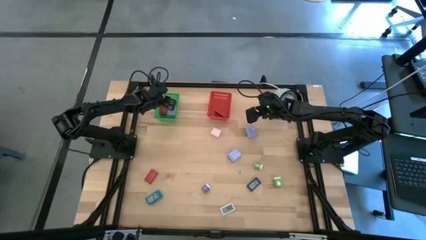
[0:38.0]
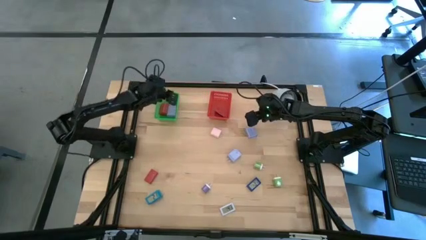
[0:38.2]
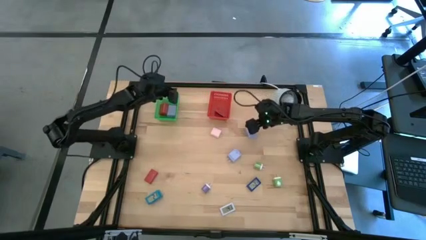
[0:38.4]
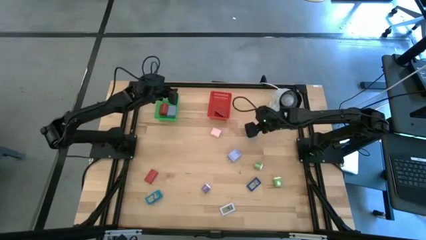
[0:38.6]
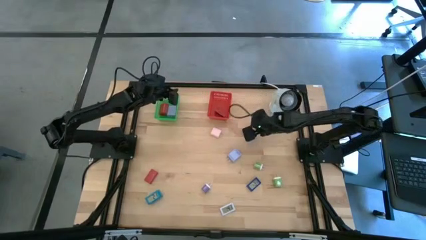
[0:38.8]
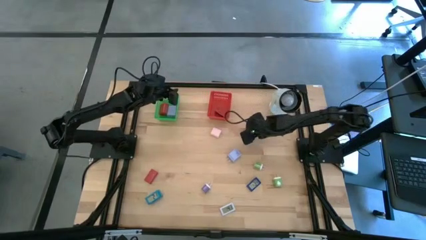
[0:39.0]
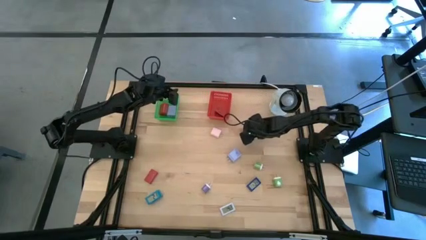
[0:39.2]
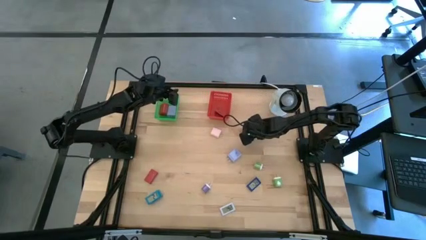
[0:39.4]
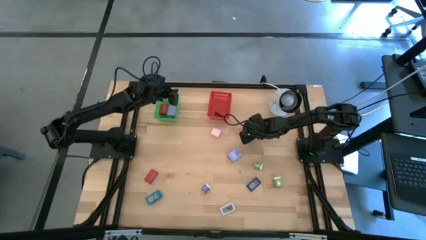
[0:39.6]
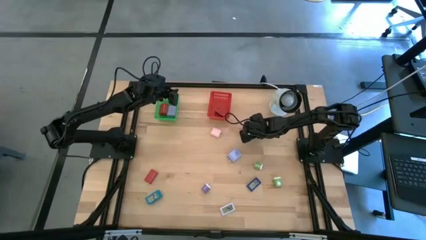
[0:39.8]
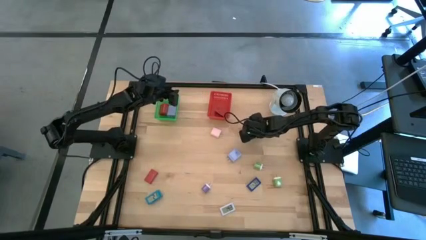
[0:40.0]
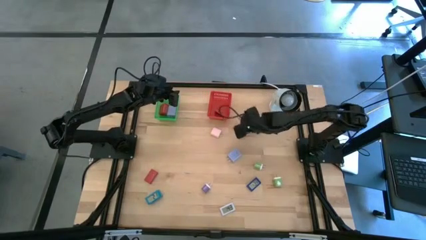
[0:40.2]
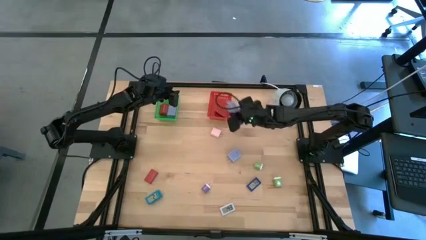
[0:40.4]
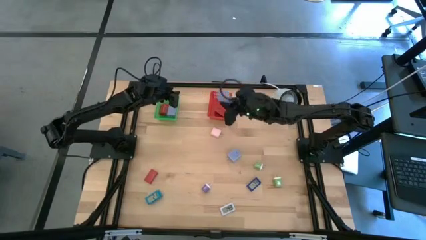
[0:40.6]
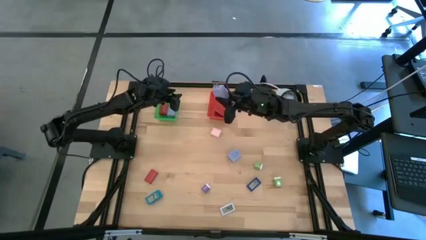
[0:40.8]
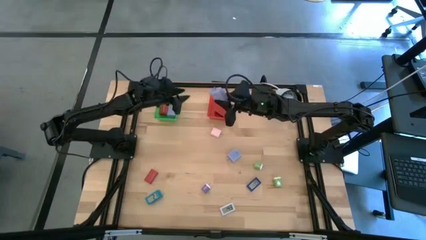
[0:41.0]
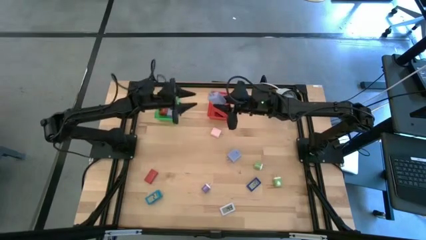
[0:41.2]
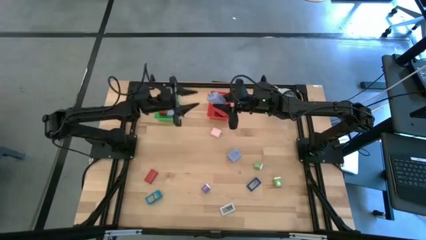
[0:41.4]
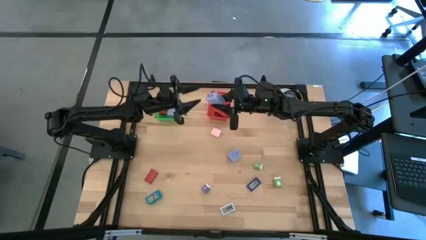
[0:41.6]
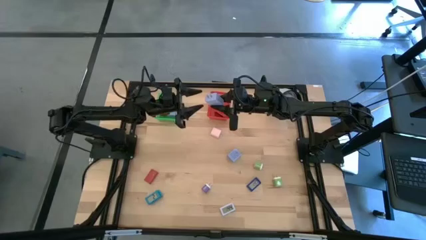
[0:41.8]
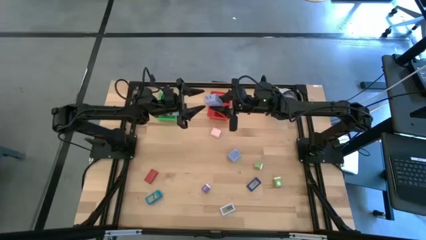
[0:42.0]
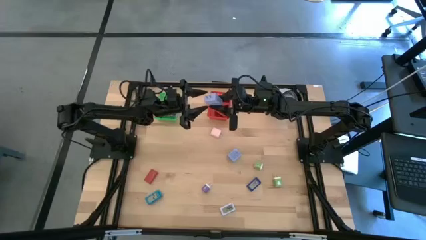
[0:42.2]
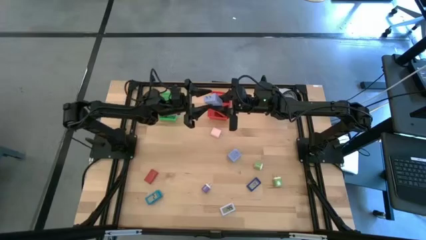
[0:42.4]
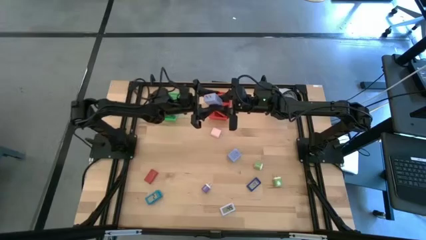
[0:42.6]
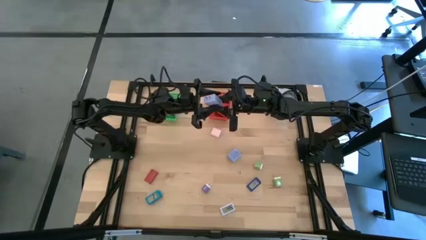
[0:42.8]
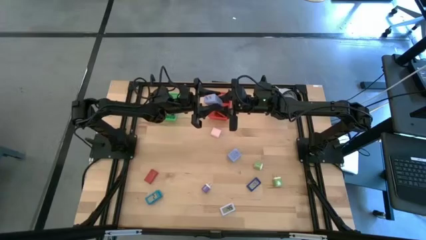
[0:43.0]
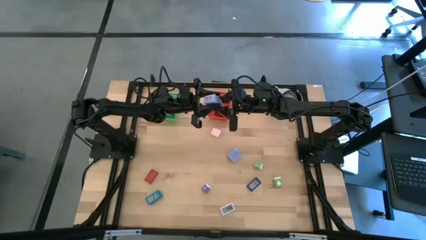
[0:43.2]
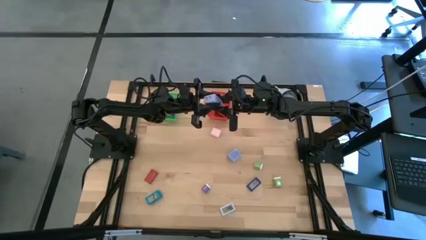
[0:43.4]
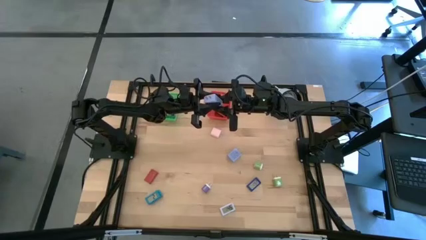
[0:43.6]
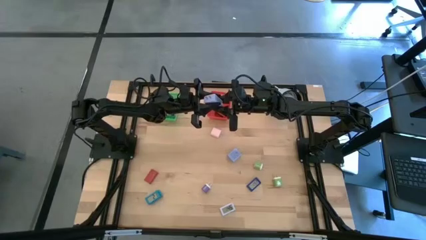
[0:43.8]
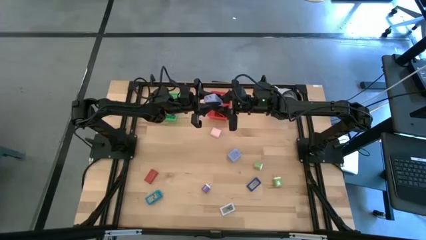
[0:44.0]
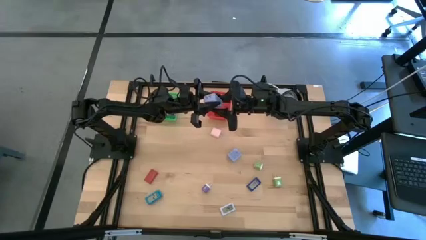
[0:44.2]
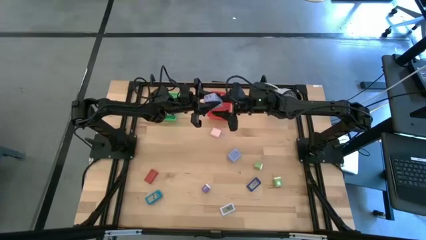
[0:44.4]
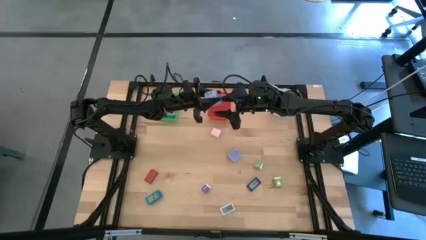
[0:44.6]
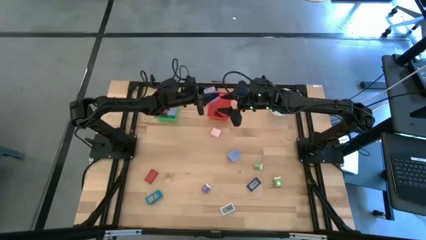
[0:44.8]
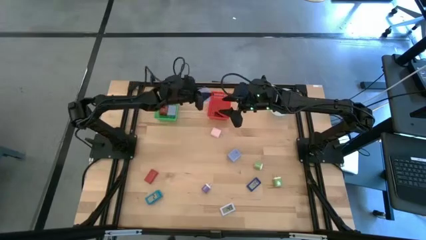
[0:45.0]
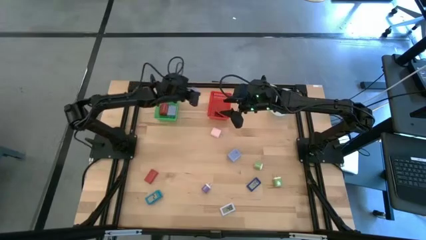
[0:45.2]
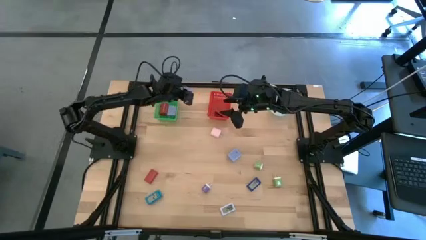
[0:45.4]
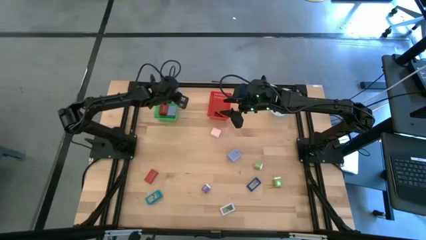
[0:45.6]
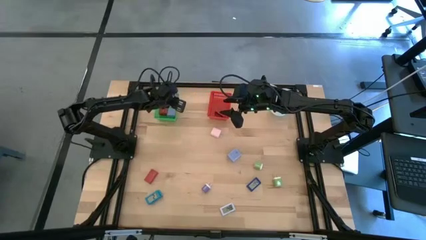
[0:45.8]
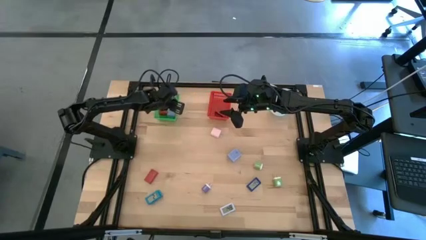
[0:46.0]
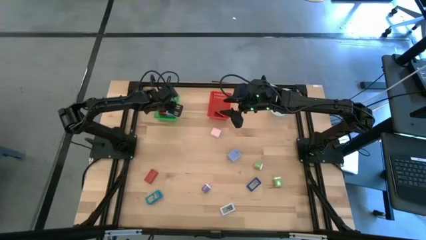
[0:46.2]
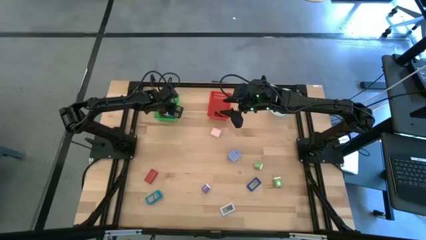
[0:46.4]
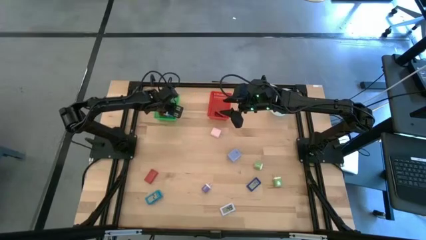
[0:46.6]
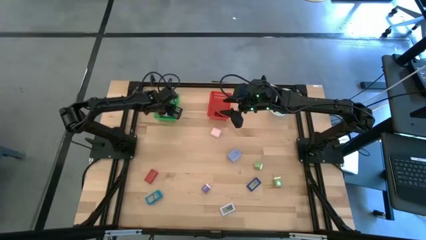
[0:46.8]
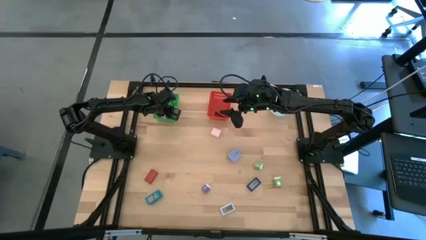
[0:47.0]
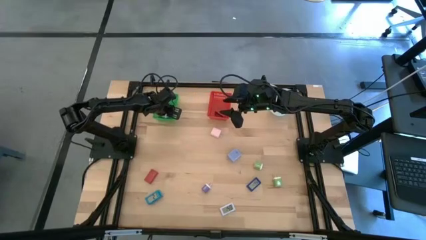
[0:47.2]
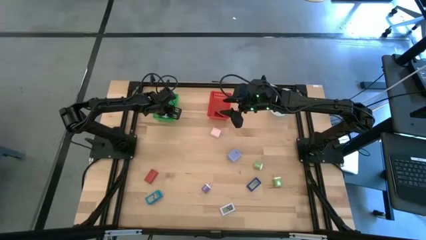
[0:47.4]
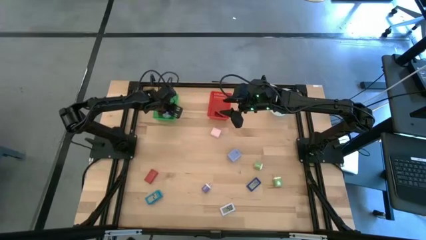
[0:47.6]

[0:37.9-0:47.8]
Task: Pick & Place Office items
Put the top light blue charger adapter into the green bin

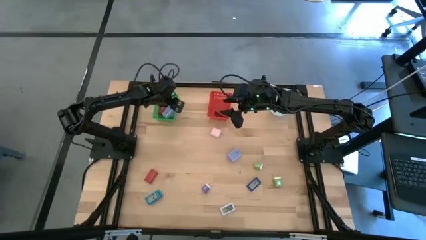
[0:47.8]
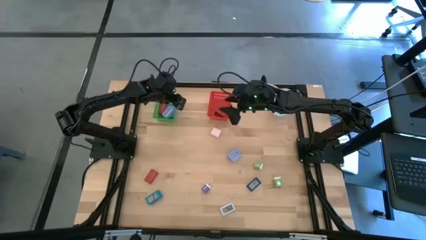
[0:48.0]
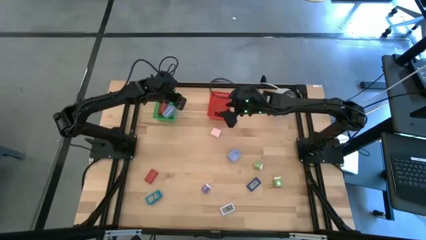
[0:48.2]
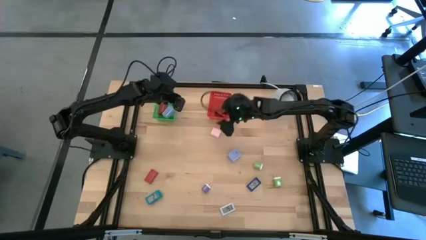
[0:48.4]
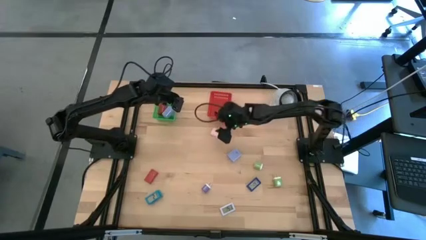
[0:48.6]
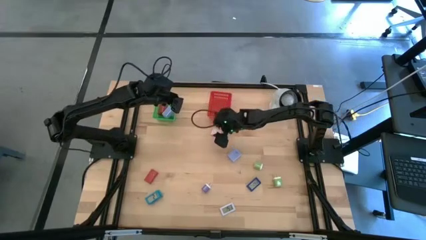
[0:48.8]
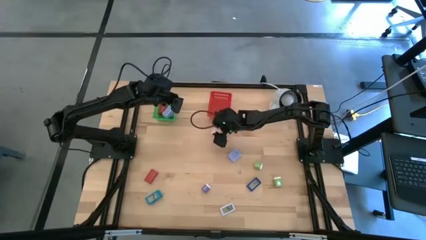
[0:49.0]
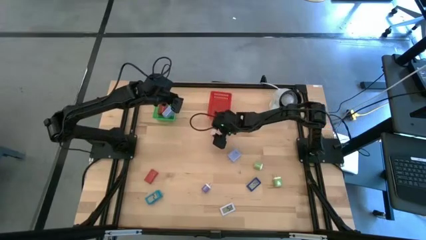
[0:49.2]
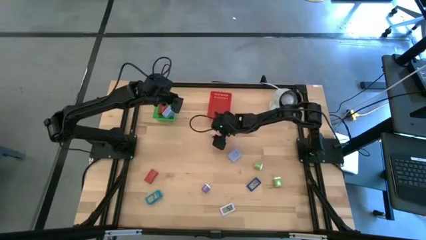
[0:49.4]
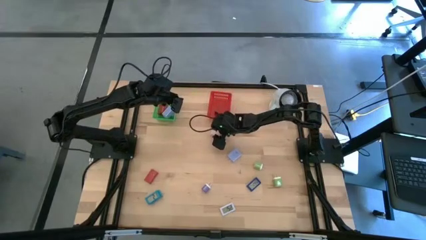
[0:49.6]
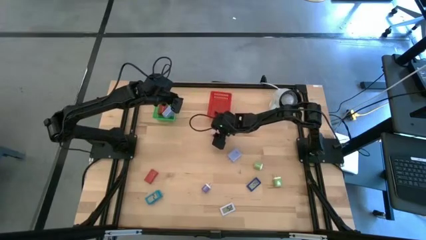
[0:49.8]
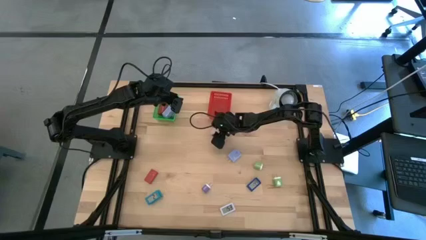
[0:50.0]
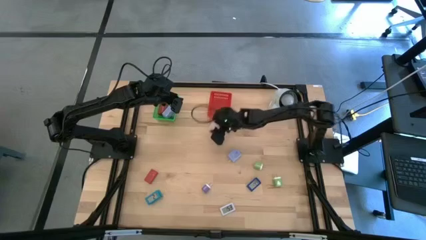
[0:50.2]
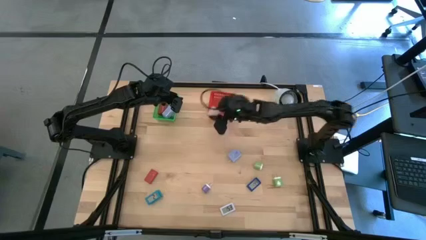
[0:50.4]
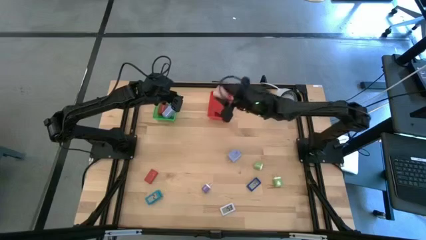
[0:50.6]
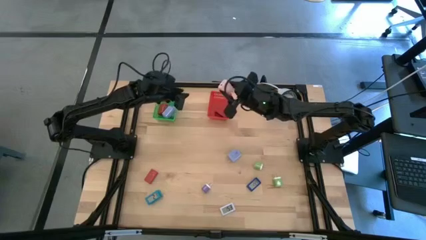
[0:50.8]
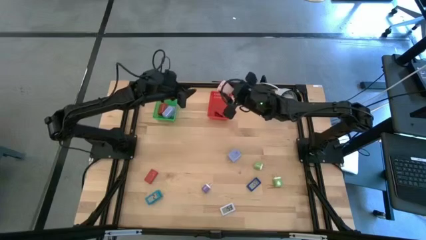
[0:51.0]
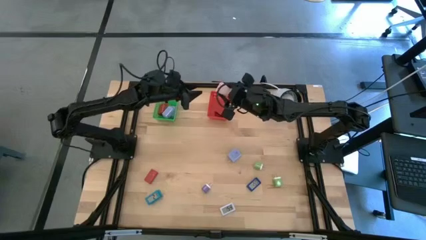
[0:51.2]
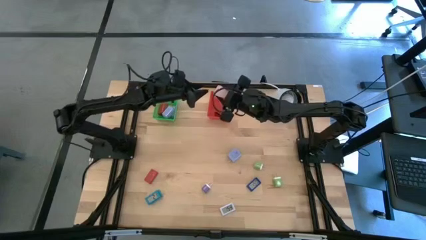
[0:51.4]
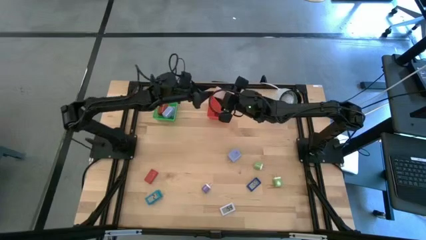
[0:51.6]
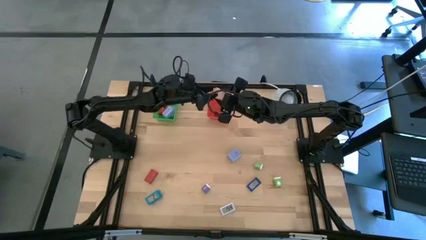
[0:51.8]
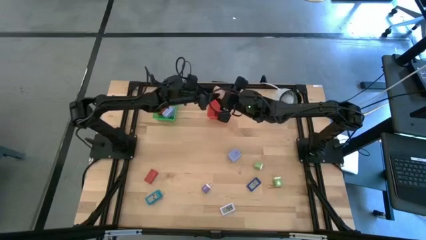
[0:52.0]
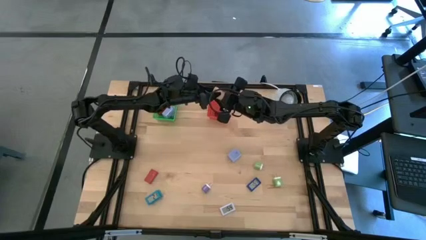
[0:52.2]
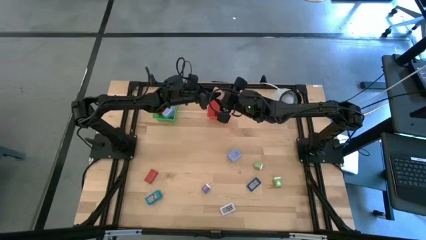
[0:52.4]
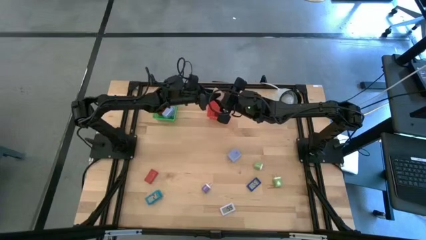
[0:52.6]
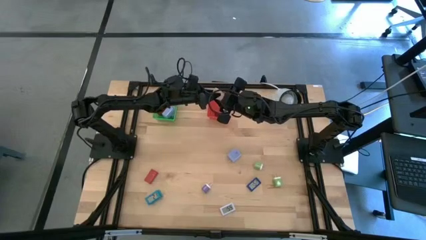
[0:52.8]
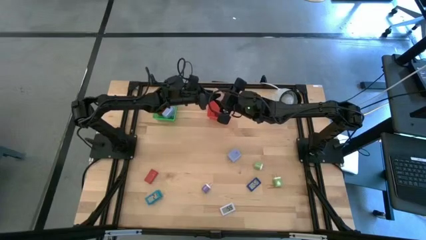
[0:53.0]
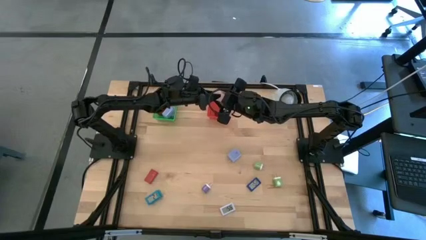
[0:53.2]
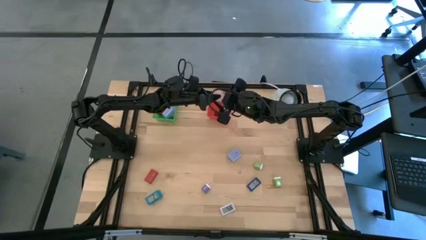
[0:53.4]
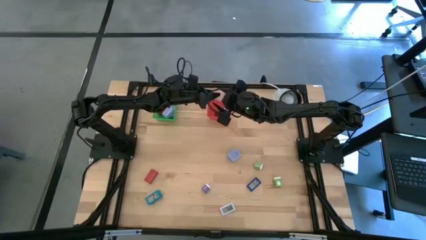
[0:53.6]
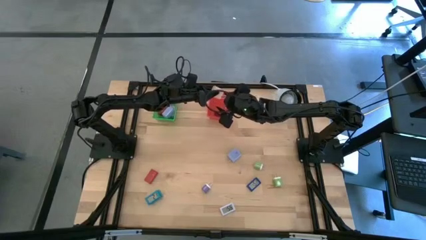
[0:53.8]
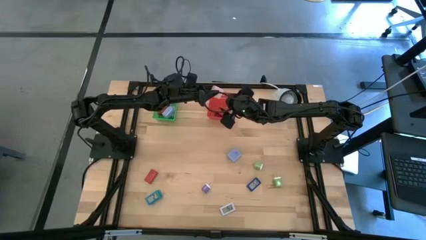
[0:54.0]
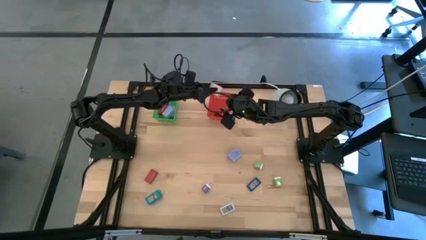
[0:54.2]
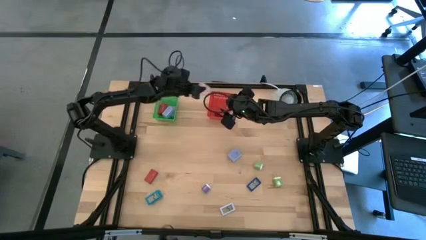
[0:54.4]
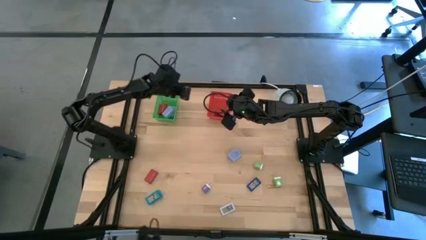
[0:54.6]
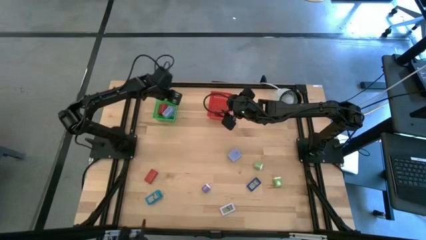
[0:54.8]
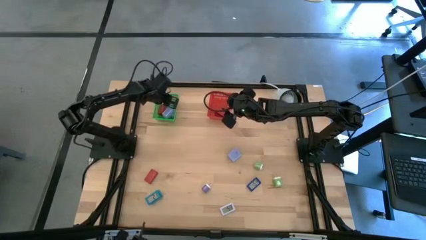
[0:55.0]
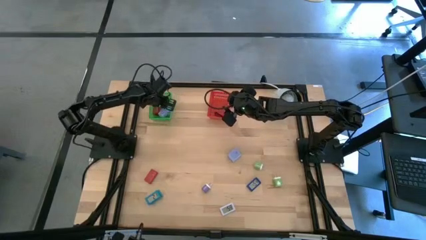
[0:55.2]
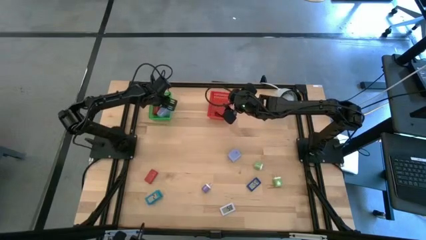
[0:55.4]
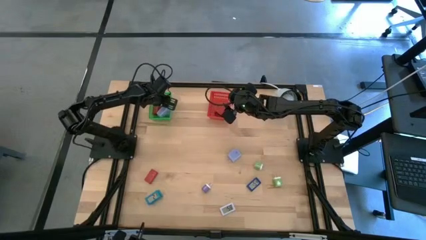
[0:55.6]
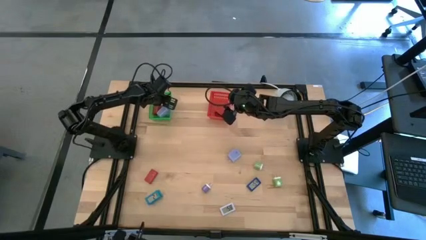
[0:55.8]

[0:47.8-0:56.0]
Put the pink charger adapter into the green bin
